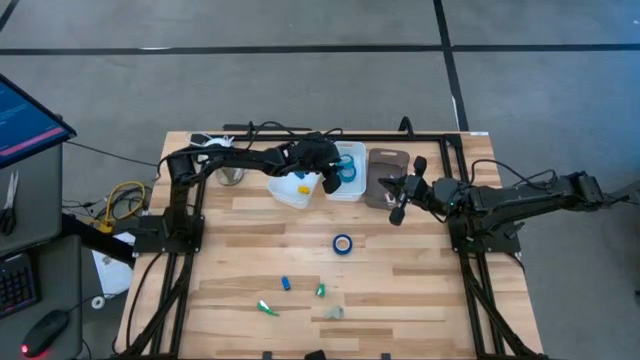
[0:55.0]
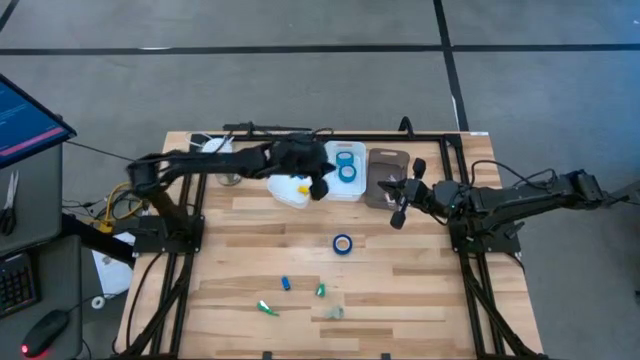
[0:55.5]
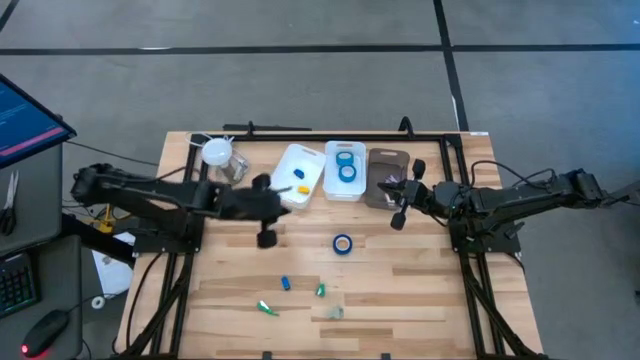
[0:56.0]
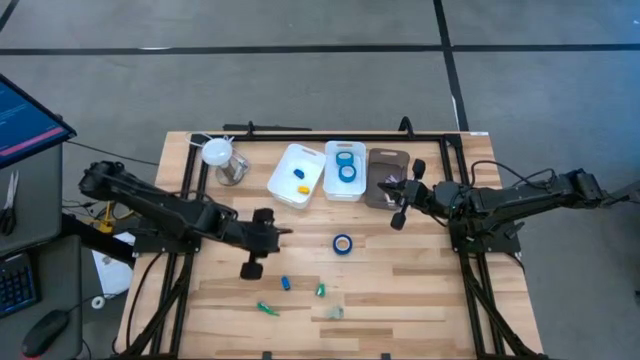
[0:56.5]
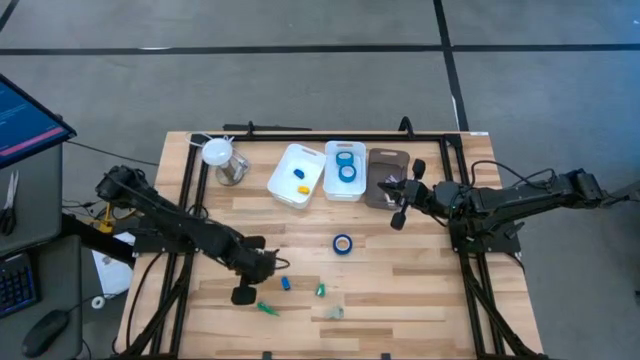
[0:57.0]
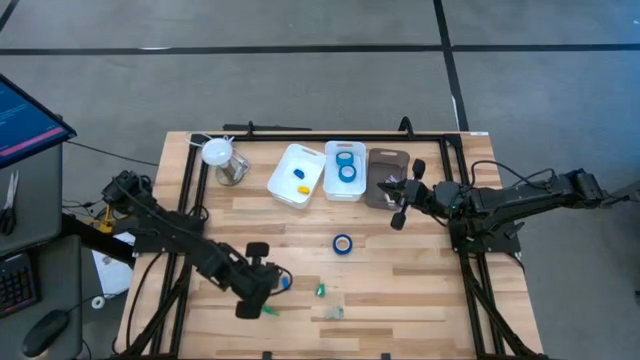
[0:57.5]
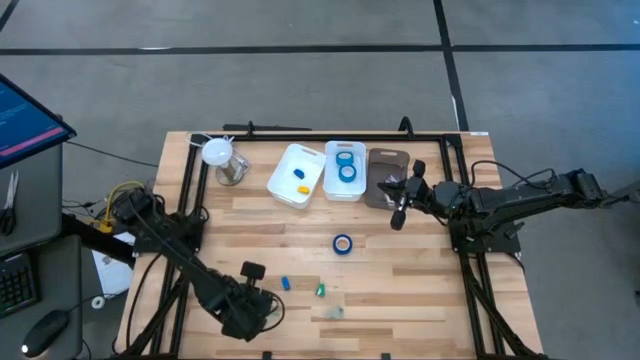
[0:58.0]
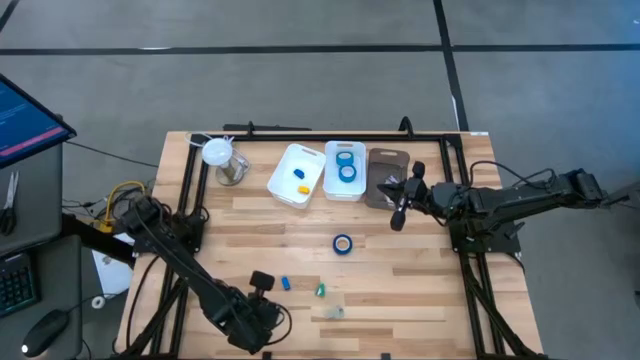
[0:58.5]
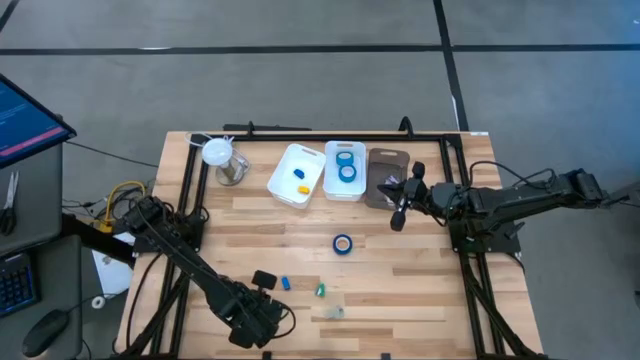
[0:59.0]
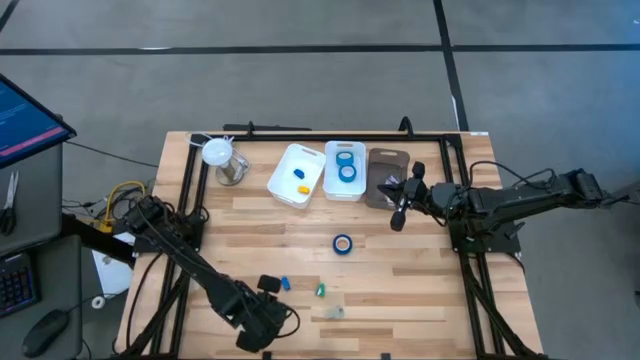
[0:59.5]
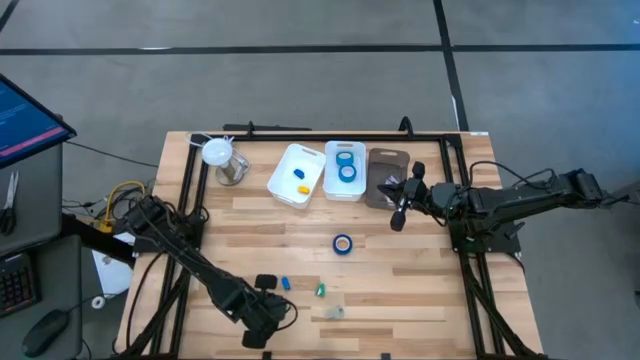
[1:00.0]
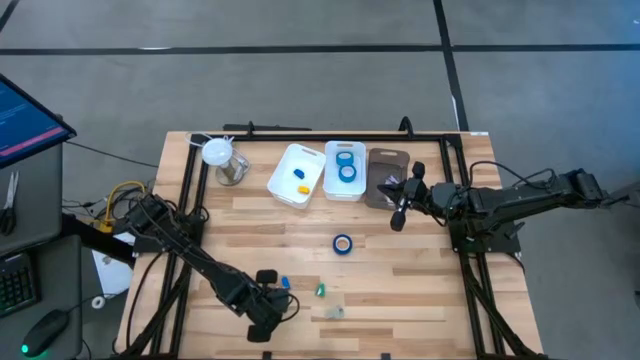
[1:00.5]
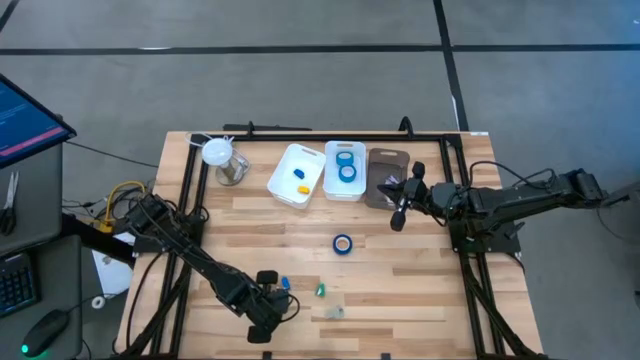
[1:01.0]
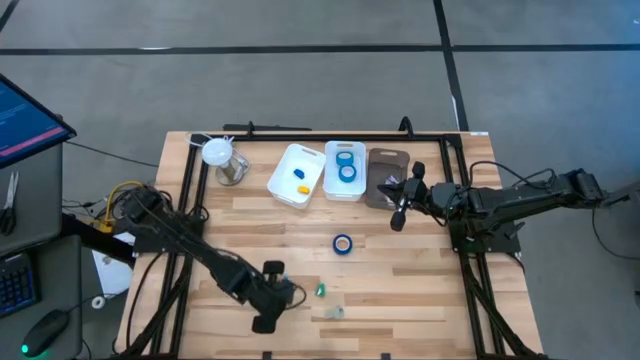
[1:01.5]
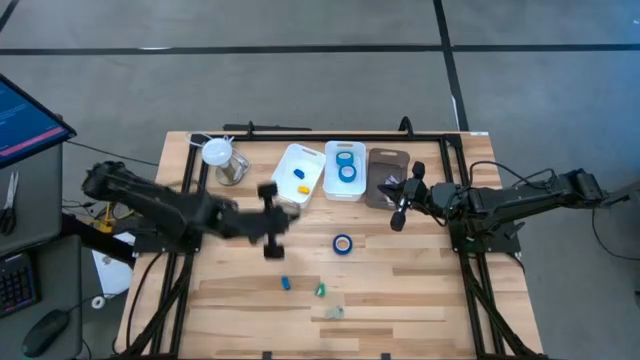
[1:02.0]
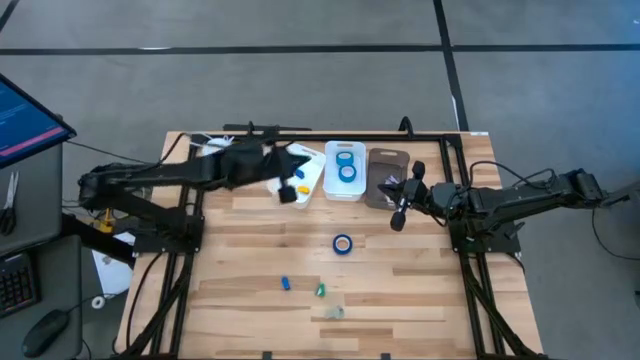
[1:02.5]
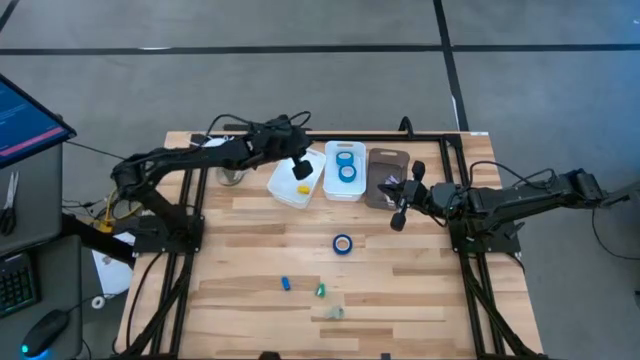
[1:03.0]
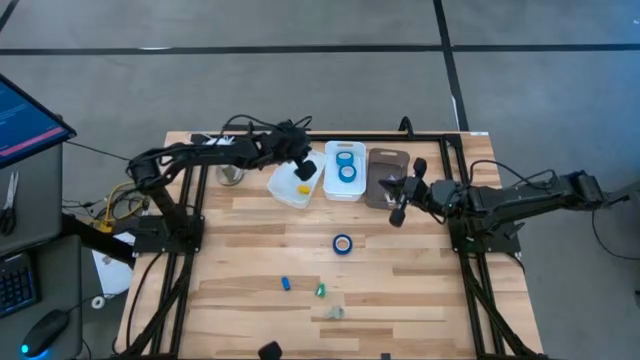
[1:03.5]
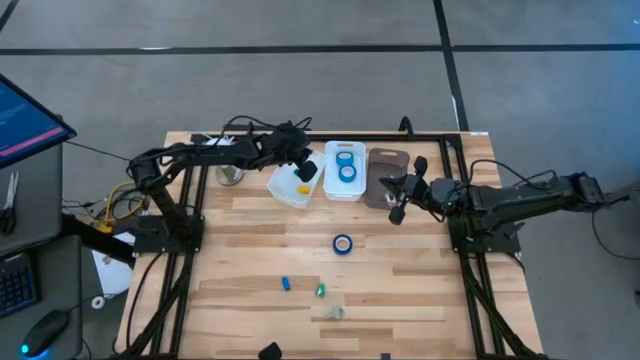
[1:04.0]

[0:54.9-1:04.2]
Task: Pick and place Stapler, Stapler remover, tape
Put the left green stapler into the left white bin

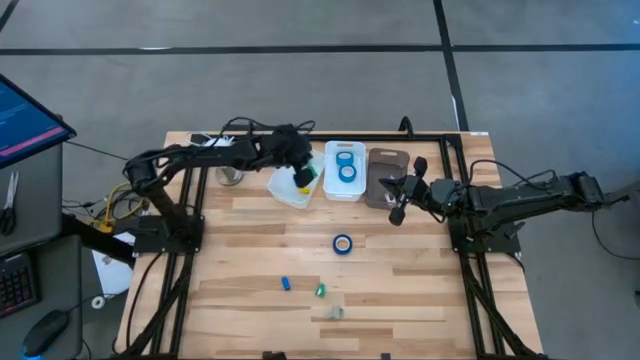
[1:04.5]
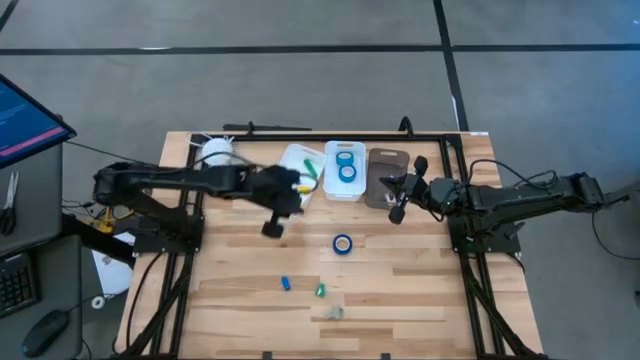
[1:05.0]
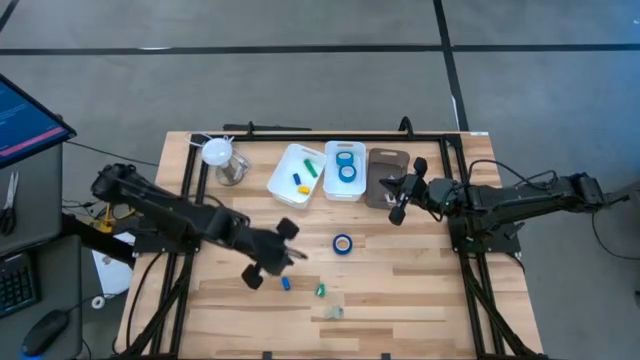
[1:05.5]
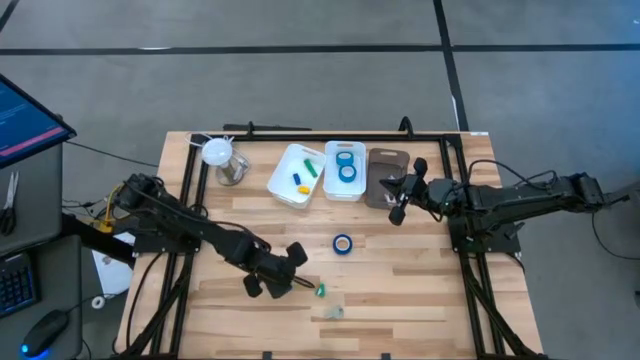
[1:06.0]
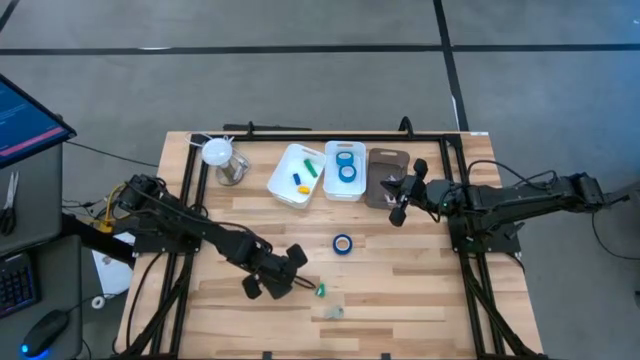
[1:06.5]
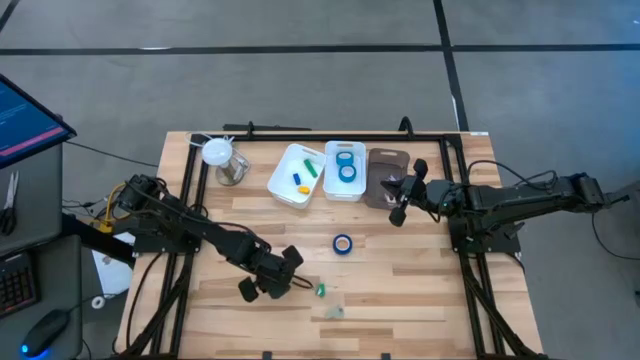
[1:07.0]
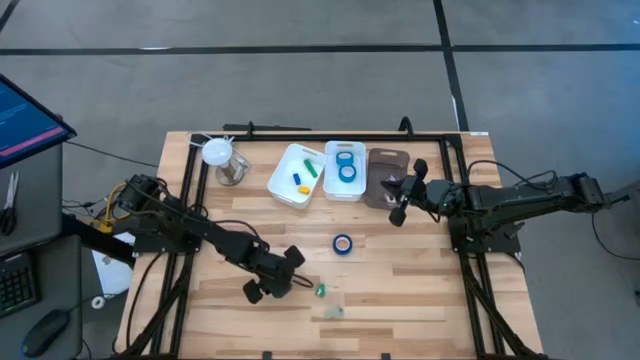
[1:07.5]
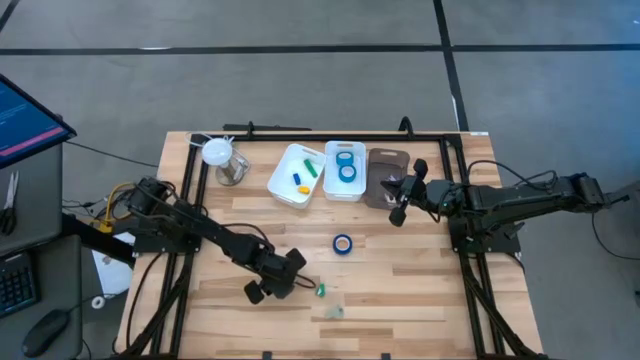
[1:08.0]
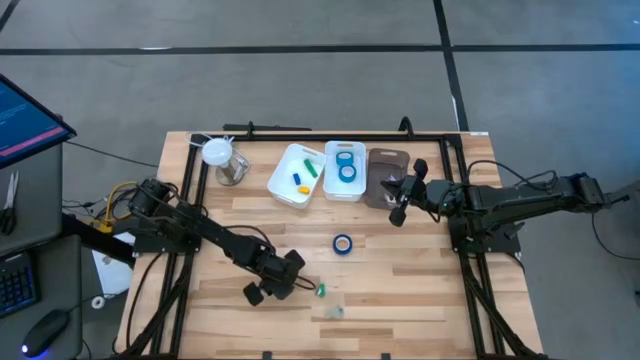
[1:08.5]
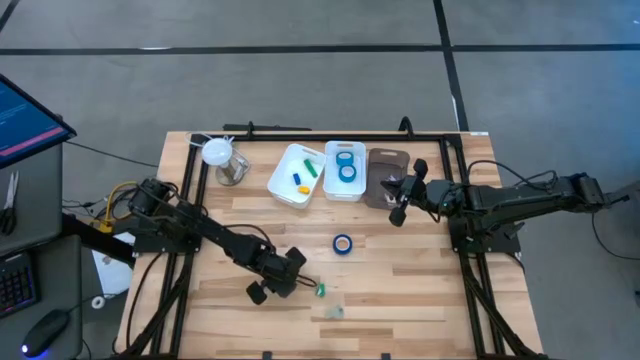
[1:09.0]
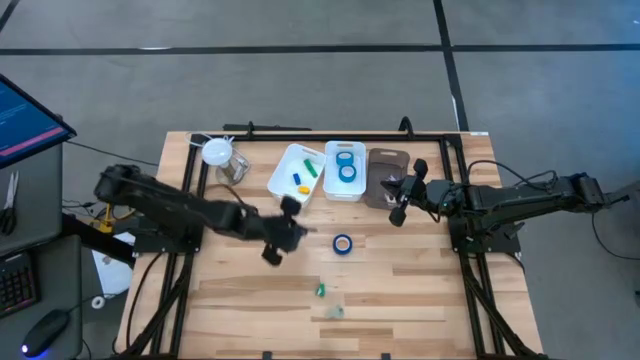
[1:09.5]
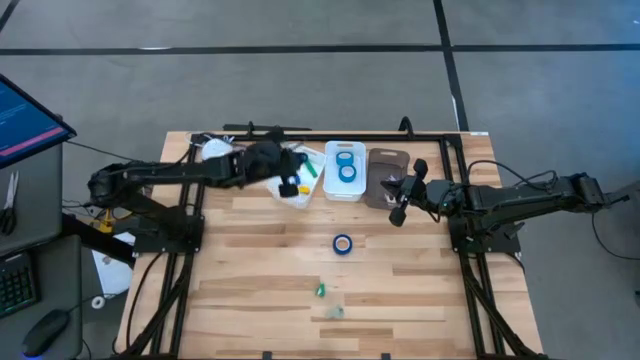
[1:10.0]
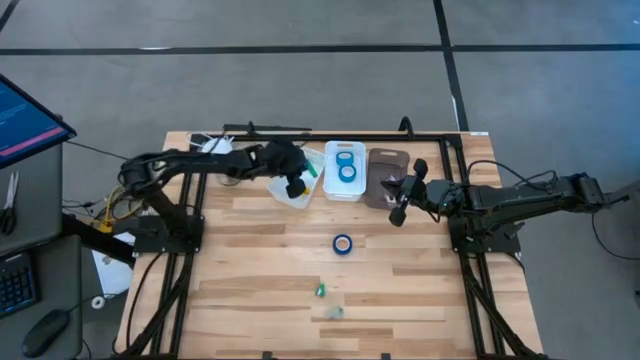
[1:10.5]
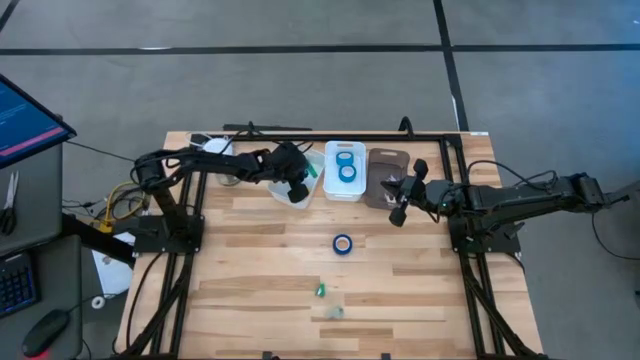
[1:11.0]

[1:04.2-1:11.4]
Put the blue stapler into the left white bin

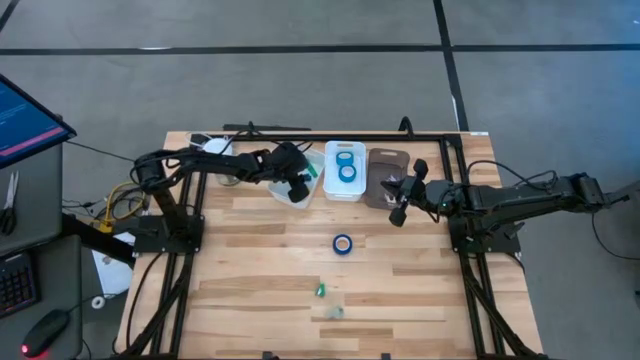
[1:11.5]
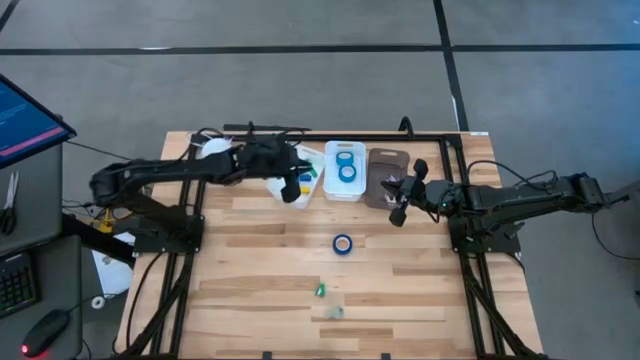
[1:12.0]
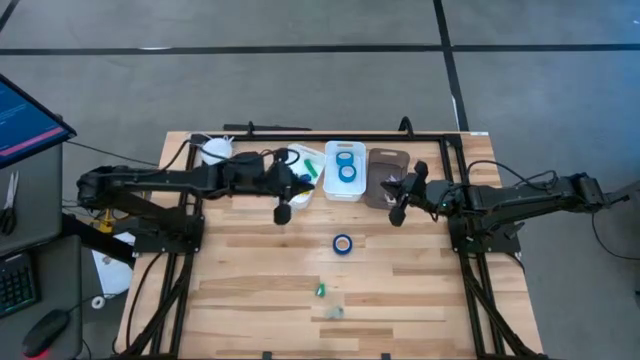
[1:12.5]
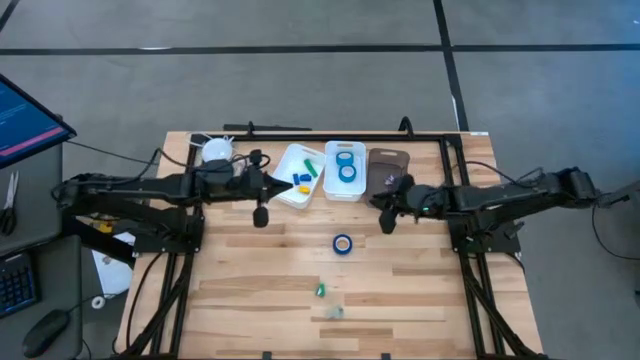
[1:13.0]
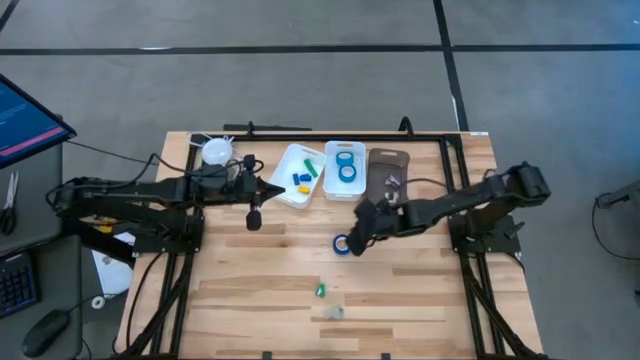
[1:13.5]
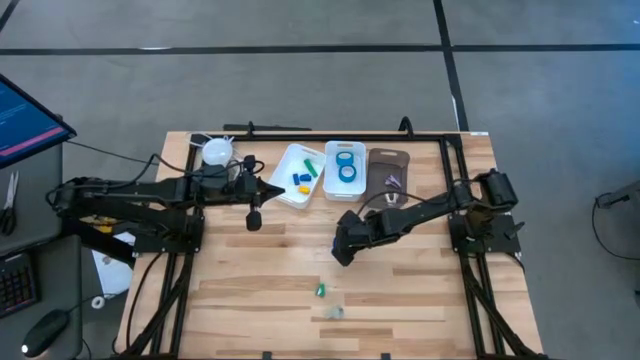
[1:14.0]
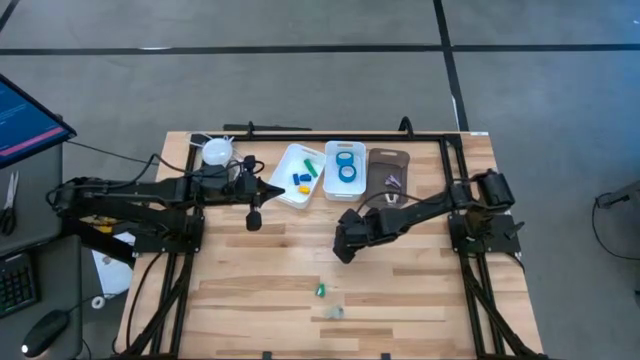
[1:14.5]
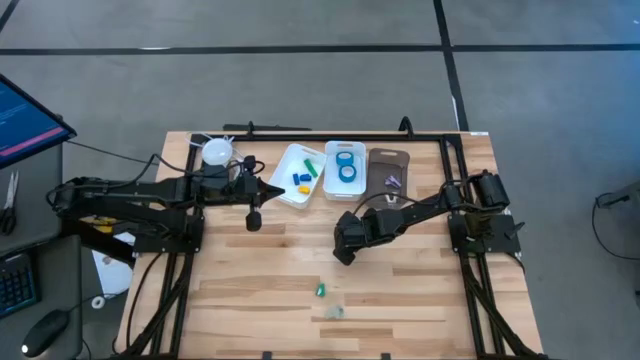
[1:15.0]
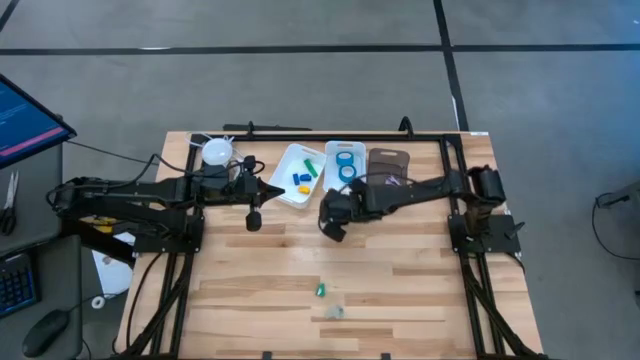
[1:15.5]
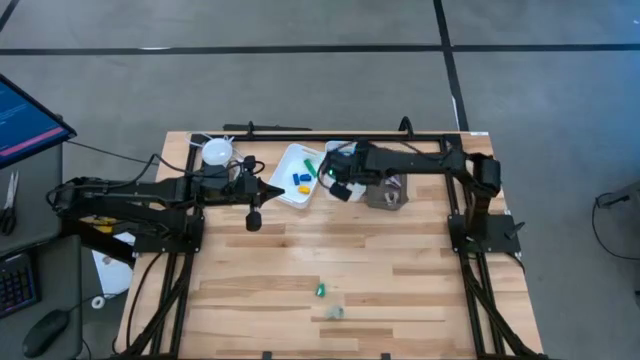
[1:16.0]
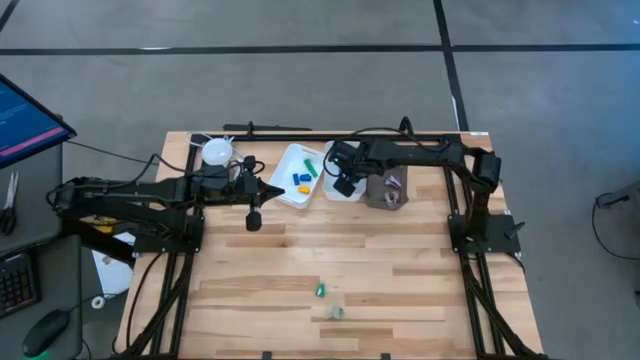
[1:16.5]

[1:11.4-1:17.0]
Put the blue tape into the right white bin
